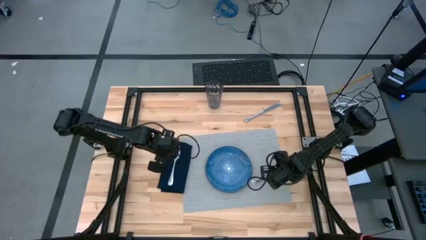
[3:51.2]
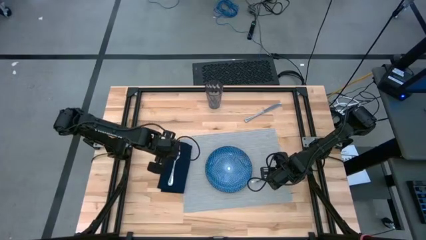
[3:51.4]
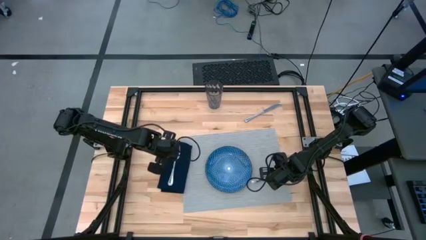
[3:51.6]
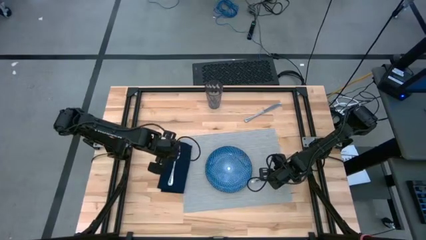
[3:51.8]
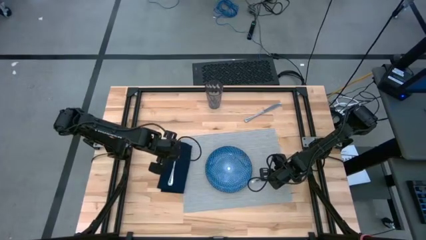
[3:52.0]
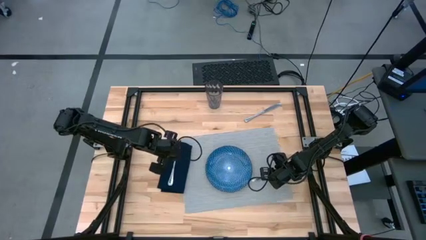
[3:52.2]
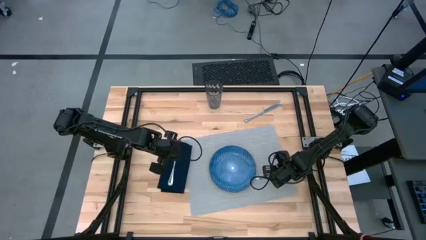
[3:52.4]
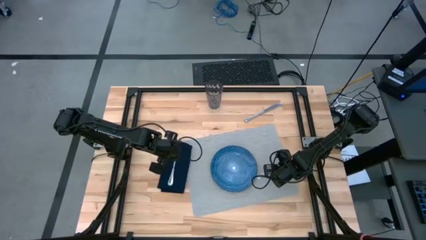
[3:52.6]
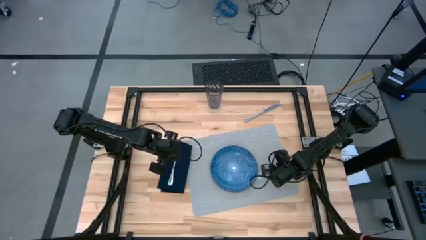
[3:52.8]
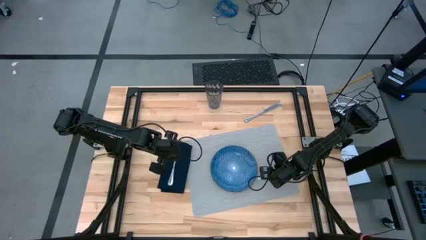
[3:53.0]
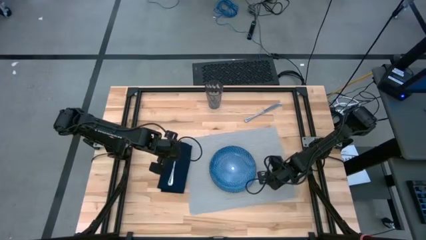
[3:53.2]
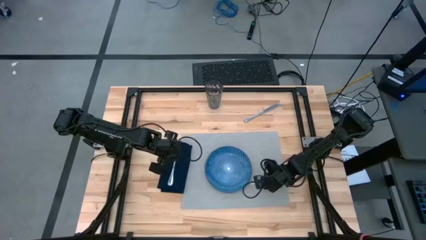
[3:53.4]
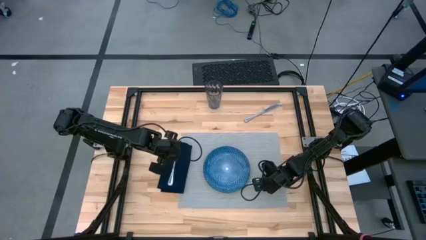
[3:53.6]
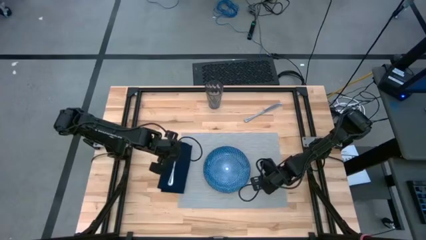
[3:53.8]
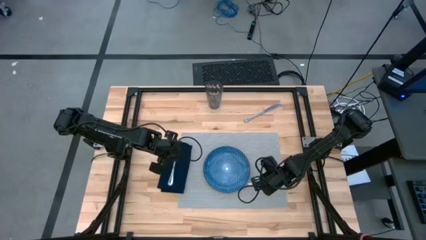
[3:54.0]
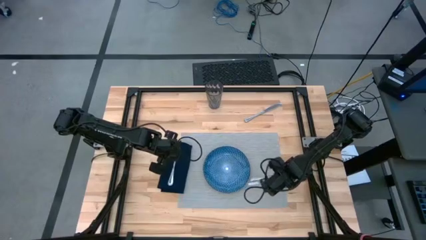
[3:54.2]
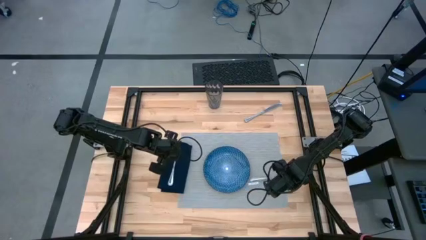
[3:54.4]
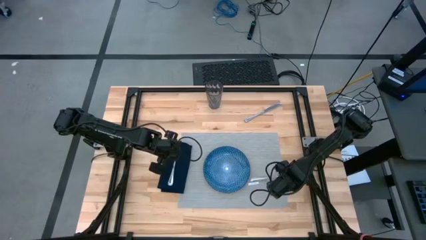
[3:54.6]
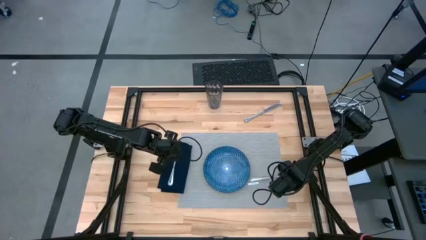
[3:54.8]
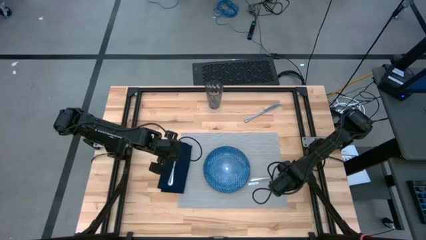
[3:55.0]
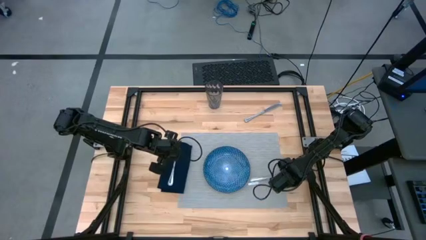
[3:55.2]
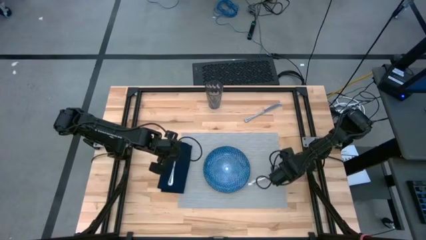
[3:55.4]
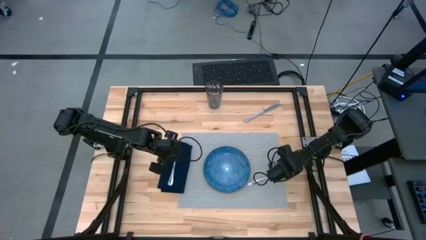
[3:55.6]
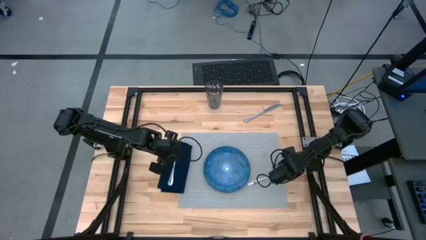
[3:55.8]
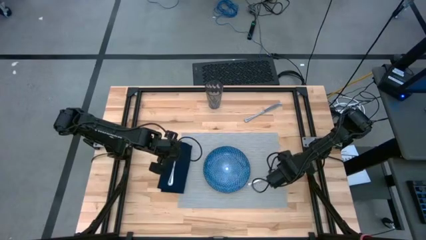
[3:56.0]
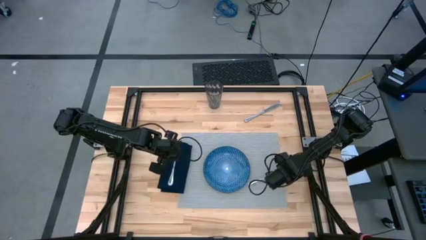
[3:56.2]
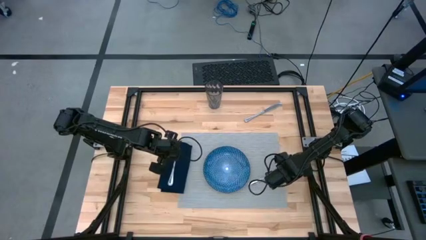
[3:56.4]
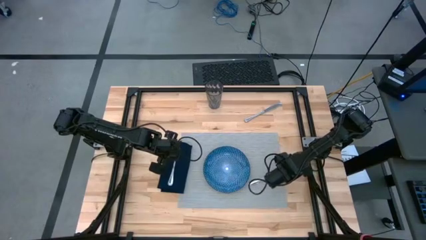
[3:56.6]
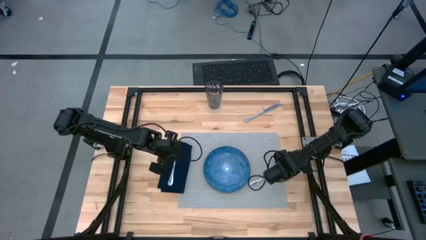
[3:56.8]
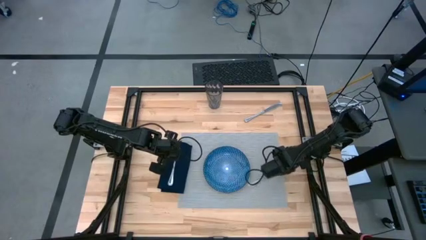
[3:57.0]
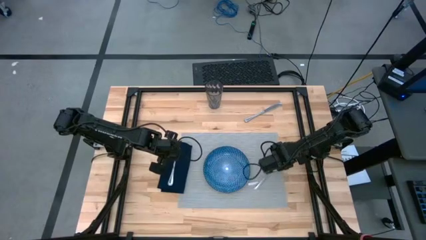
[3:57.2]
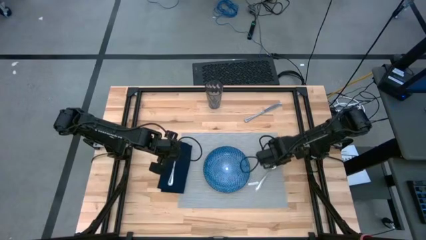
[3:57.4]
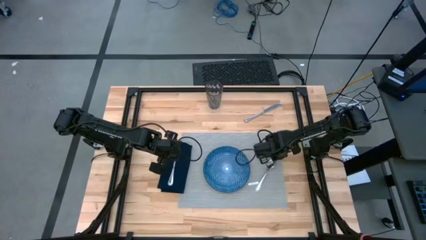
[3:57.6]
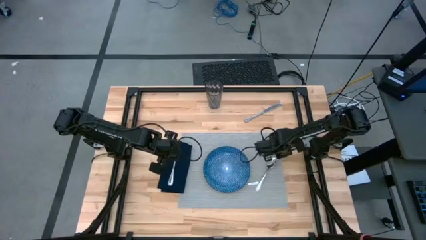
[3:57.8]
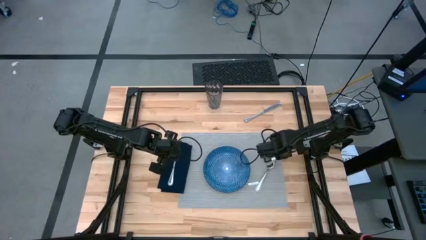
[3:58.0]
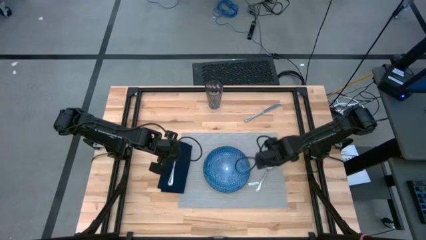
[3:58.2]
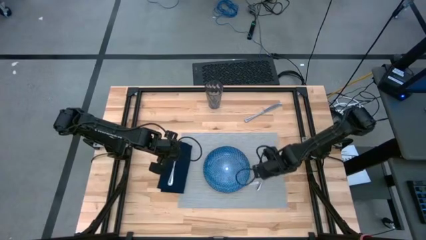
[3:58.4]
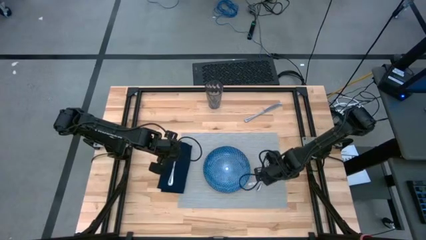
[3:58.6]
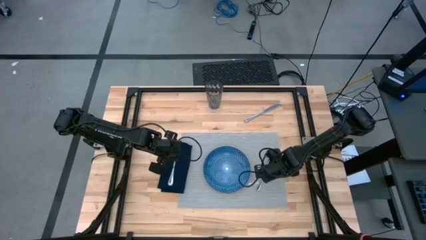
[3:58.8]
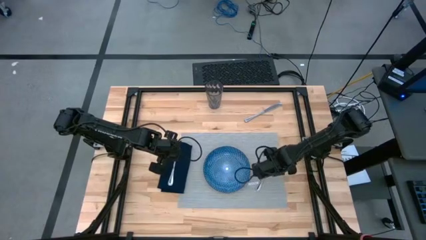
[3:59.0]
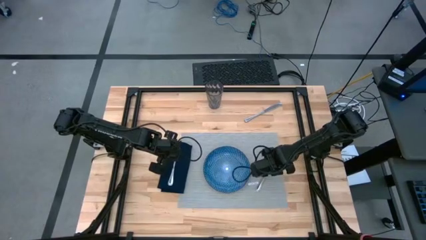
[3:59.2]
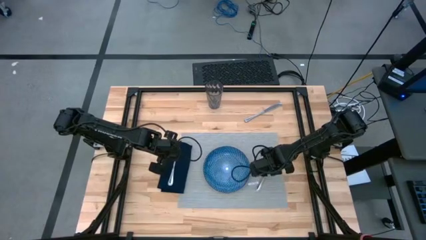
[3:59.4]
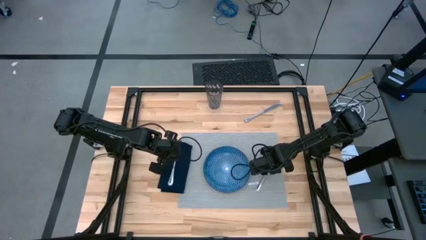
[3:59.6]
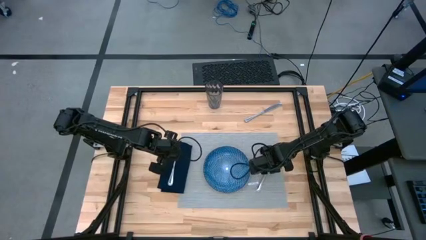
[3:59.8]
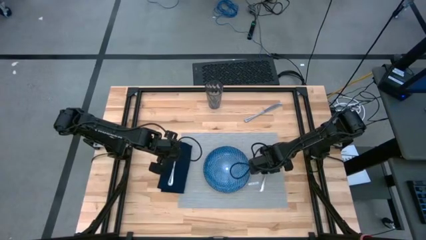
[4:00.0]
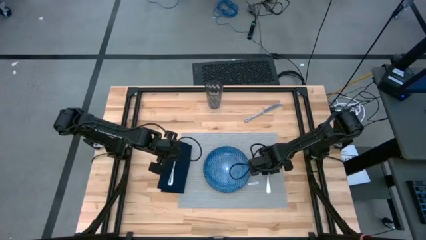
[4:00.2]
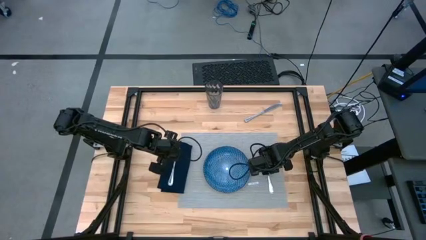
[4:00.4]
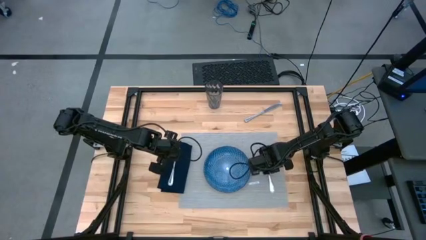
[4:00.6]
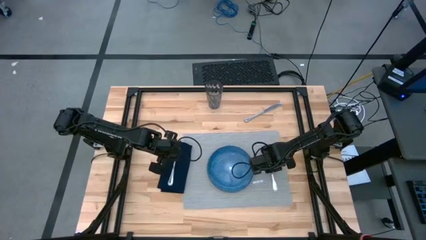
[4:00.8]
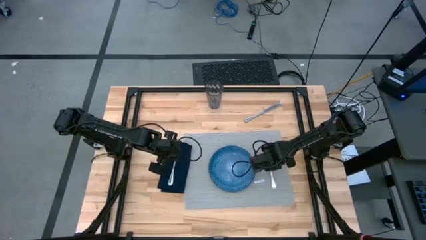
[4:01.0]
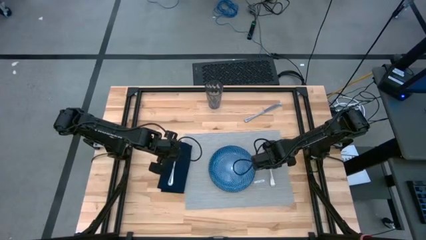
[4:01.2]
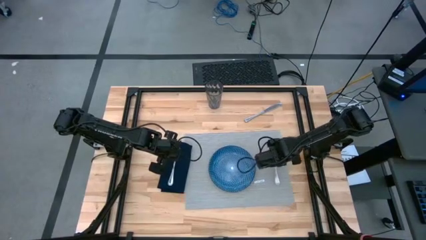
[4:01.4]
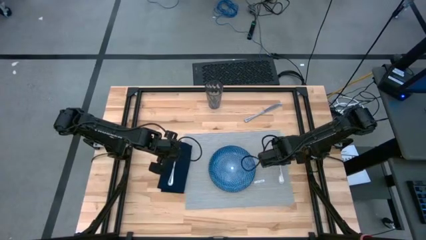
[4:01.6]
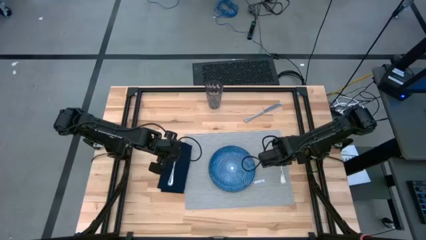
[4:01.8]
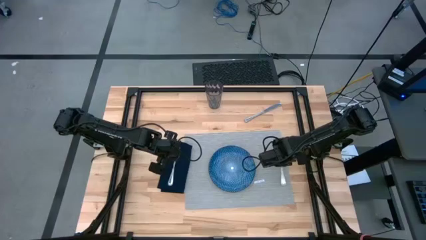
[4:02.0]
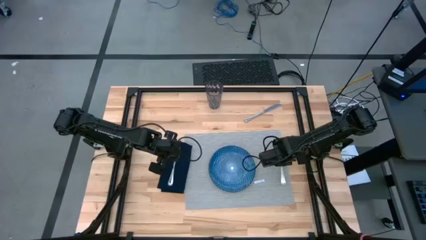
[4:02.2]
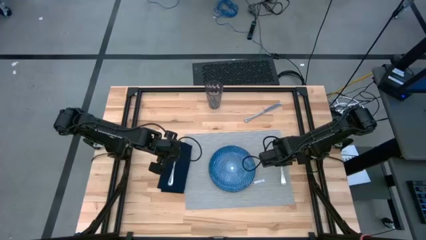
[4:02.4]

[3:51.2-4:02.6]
Task: Set table place
Put the silver spoon to the right of the blue plate on the gray placemat

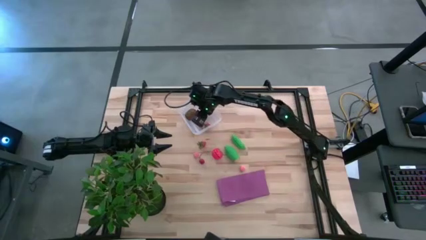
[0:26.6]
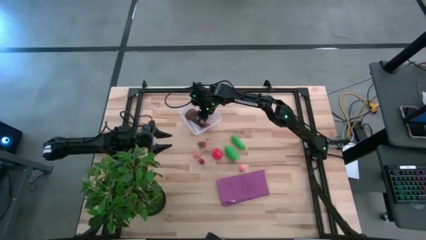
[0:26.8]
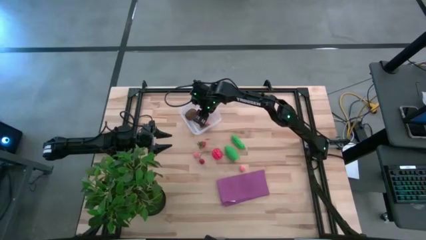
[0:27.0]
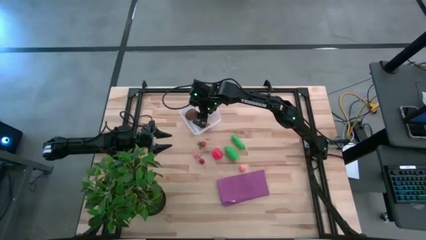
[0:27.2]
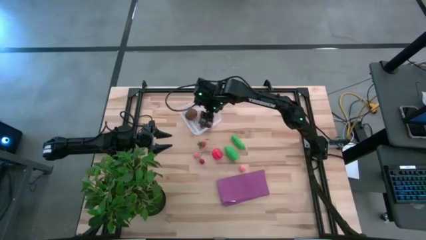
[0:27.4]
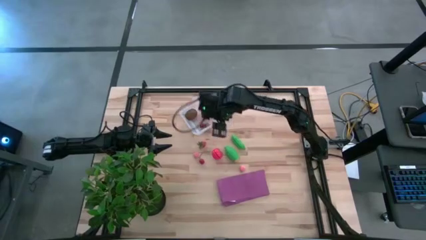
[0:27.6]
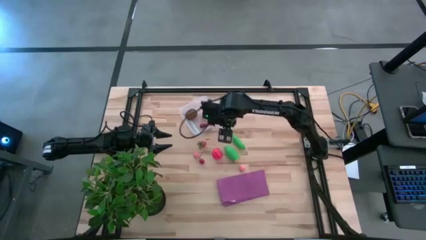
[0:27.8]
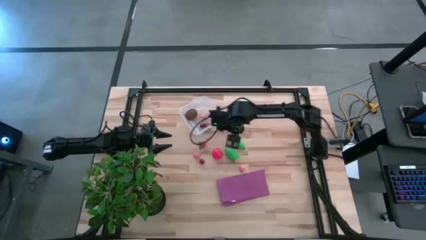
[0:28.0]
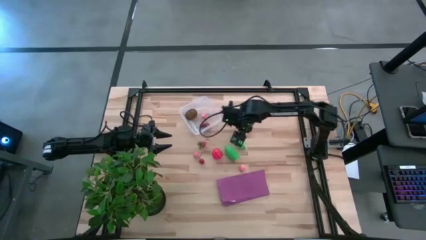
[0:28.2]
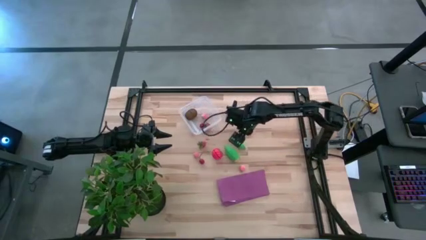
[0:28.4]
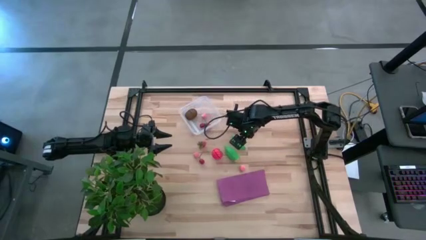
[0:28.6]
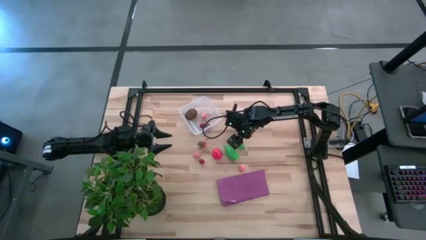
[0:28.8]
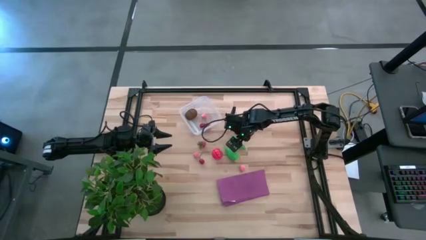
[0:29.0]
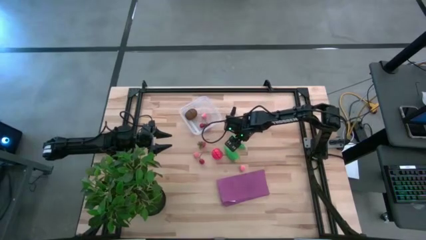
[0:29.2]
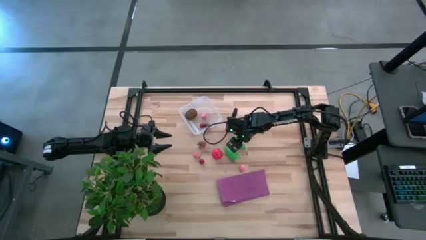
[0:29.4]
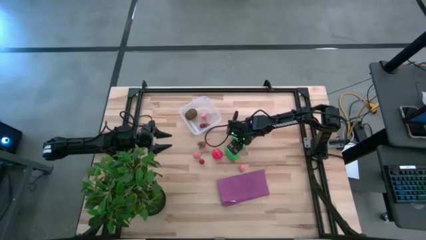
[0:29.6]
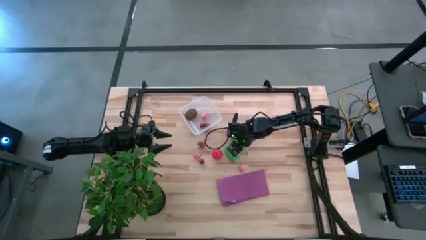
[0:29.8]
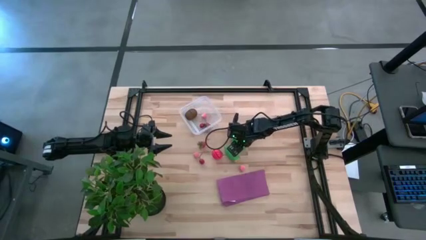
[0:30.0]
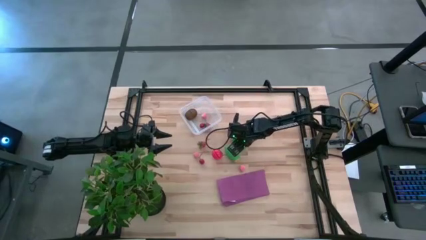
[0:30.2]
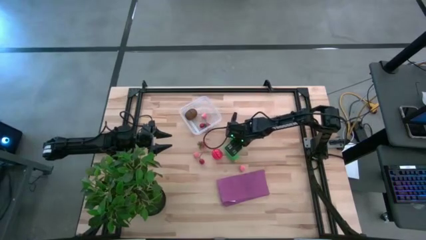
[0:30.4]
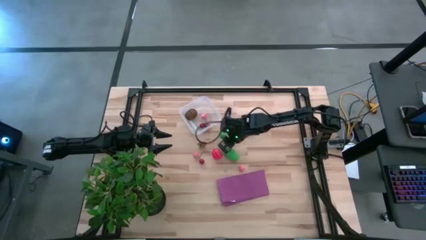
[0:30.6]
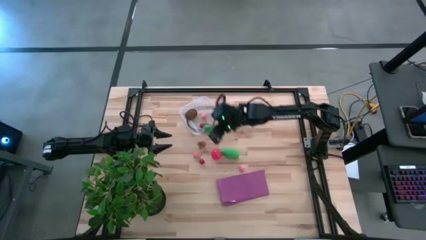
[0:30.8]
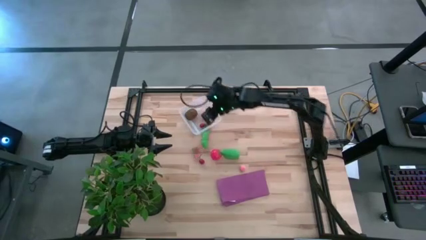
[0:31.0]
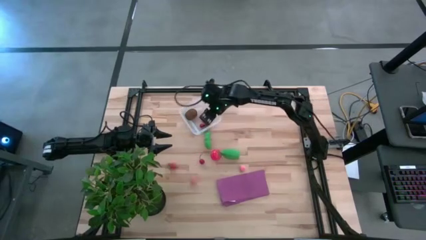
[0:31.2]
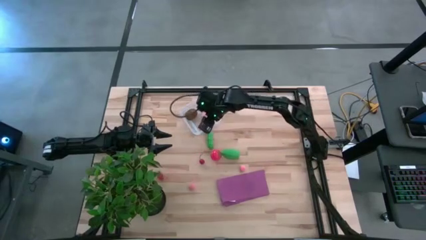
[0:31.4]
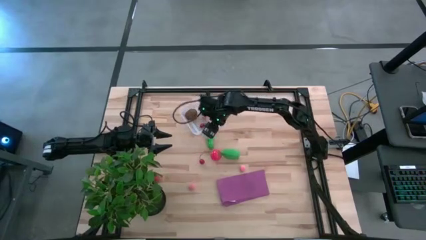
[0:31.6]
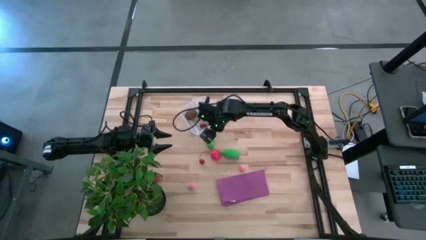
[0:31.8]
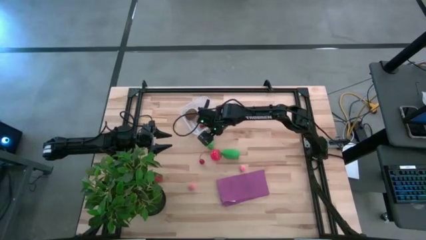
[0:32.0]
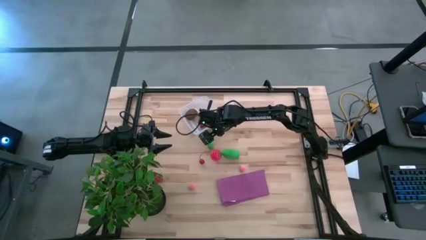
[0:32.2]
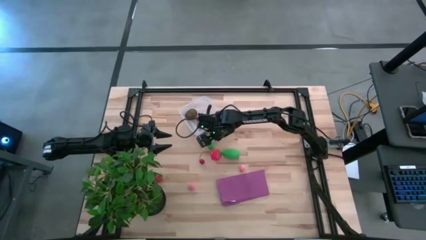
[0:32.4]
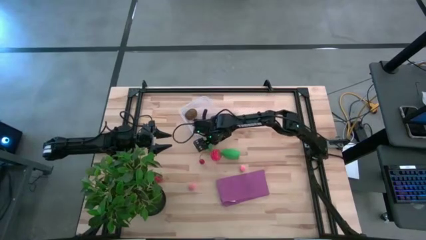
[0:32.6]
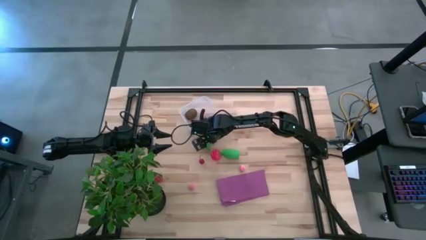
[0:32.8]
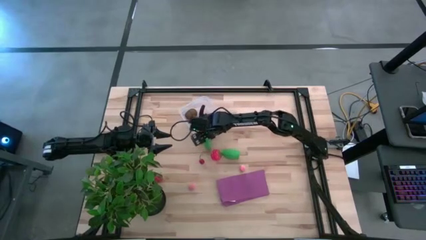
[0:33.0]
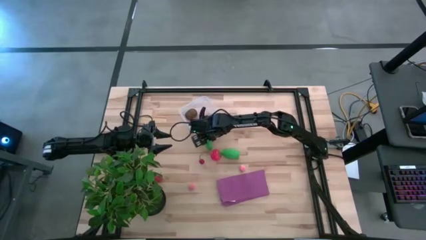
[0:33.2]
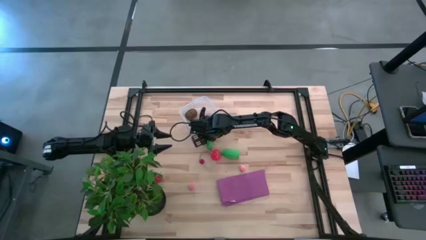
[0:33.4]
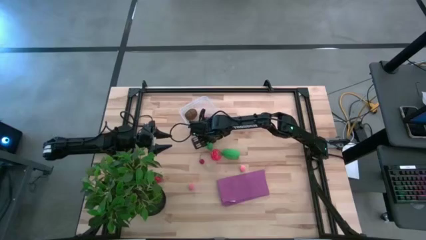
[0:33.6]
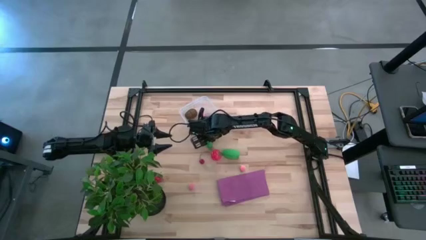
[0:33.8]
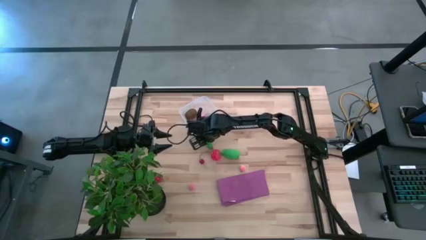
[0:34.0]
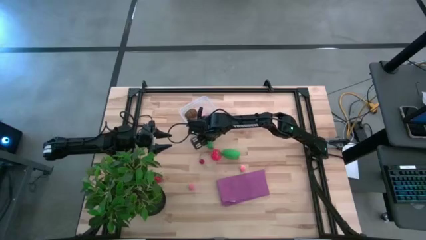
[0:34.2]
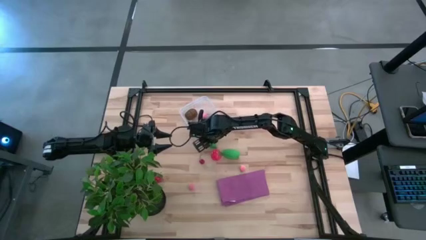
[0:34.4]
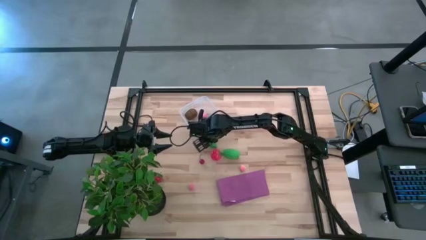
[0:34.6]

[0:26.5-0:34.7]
Task: Pick and placing Produce into tupperware
Put the green peas into the transparent bin
